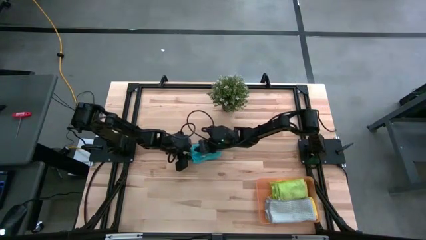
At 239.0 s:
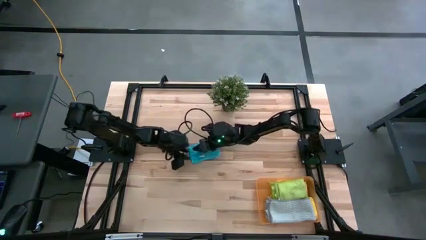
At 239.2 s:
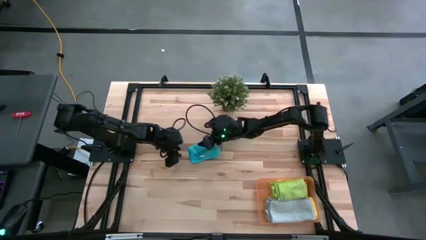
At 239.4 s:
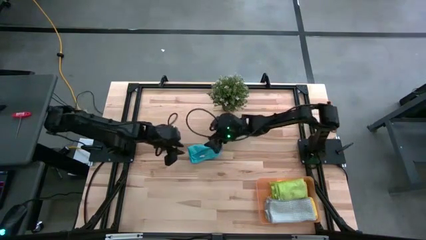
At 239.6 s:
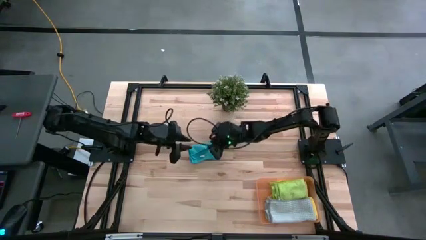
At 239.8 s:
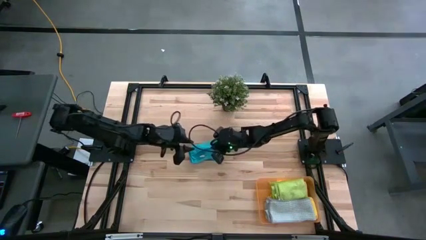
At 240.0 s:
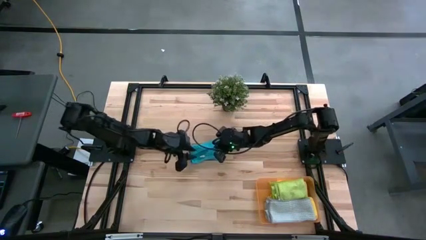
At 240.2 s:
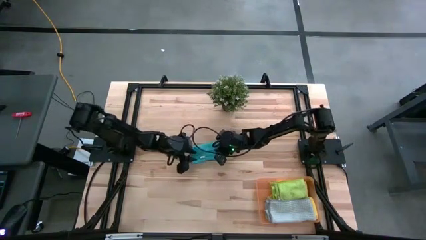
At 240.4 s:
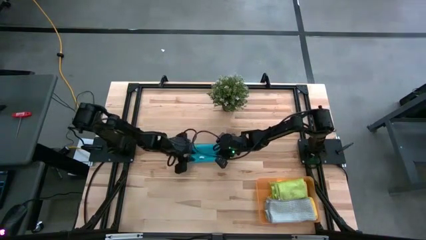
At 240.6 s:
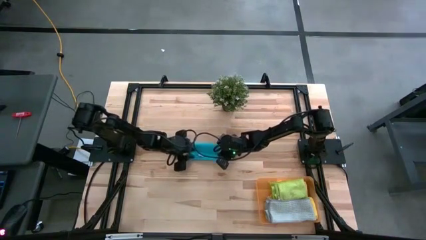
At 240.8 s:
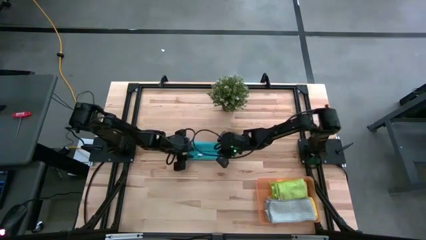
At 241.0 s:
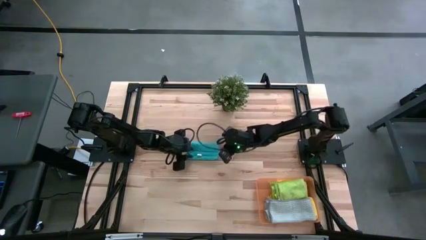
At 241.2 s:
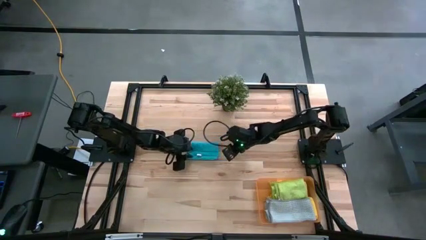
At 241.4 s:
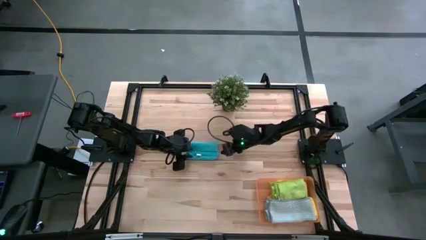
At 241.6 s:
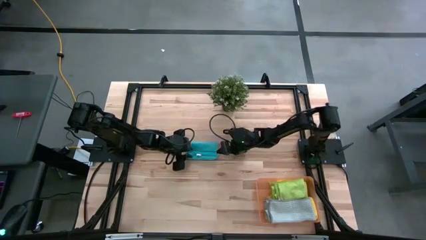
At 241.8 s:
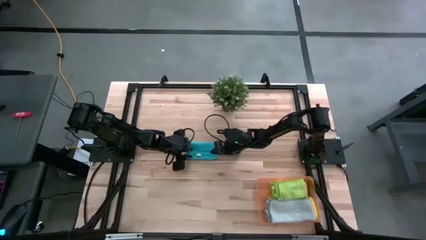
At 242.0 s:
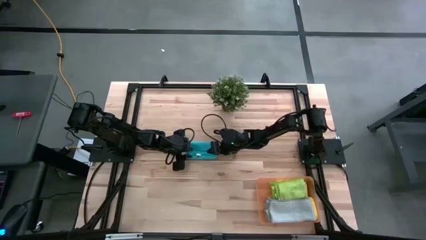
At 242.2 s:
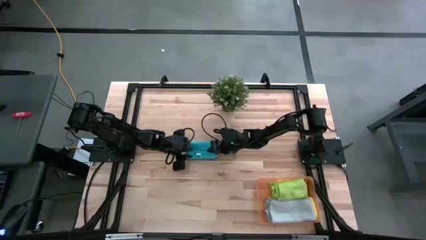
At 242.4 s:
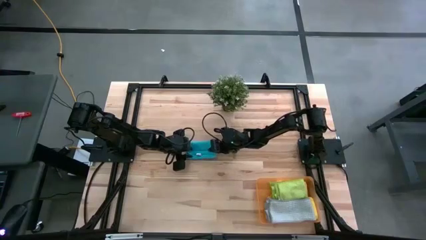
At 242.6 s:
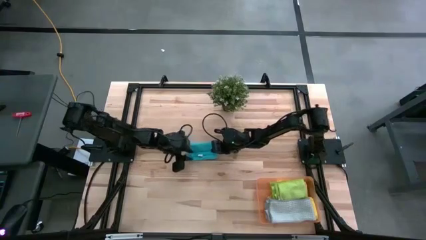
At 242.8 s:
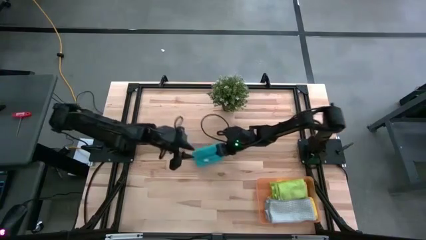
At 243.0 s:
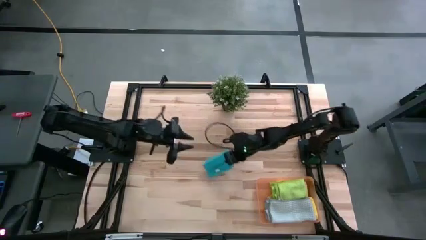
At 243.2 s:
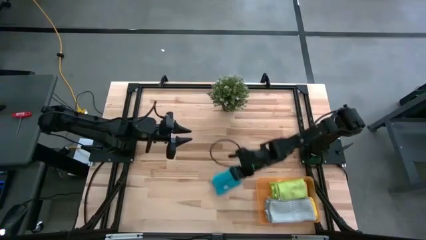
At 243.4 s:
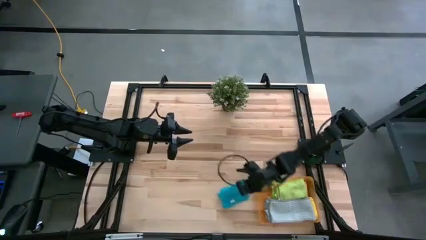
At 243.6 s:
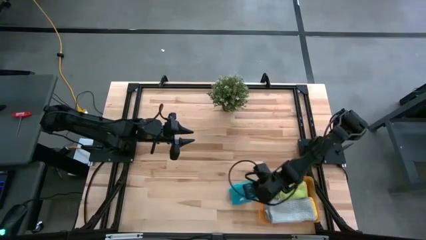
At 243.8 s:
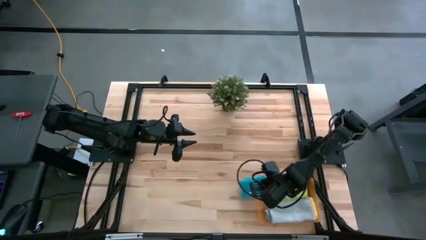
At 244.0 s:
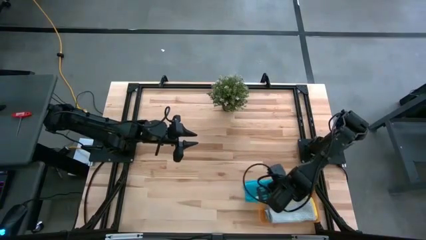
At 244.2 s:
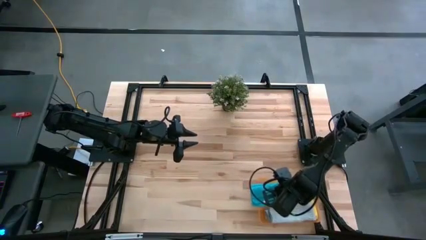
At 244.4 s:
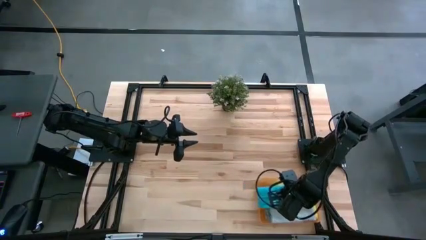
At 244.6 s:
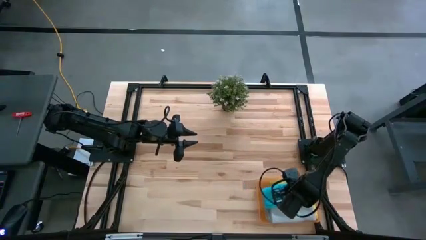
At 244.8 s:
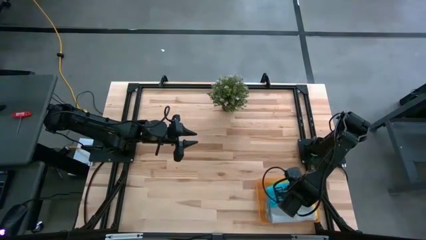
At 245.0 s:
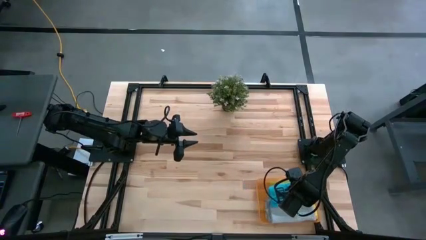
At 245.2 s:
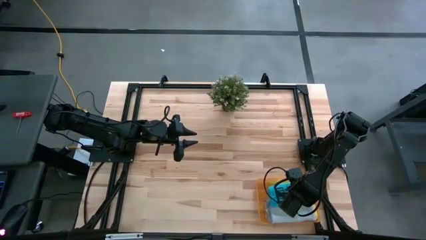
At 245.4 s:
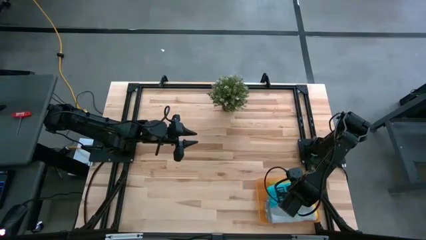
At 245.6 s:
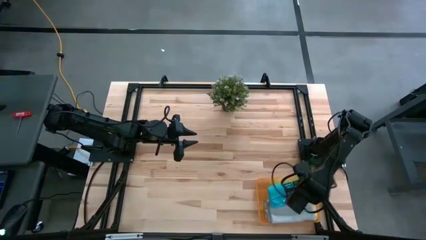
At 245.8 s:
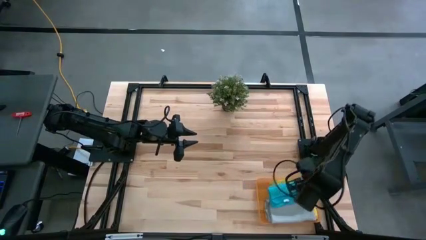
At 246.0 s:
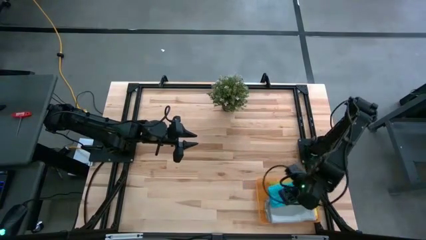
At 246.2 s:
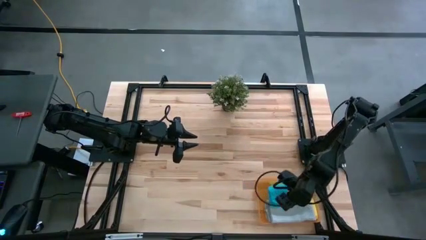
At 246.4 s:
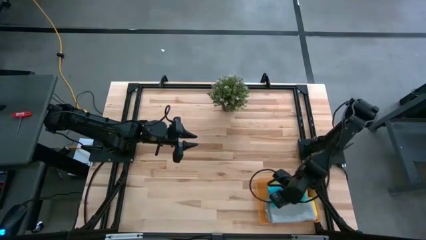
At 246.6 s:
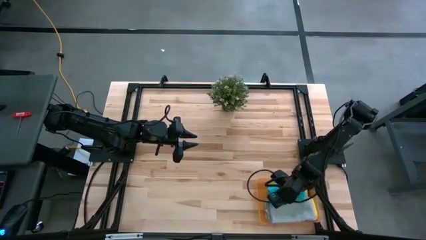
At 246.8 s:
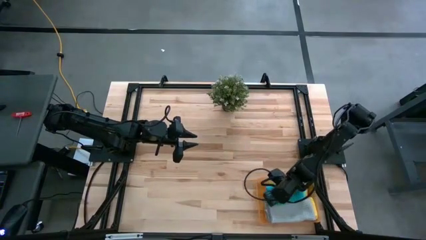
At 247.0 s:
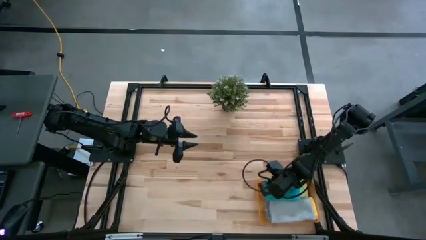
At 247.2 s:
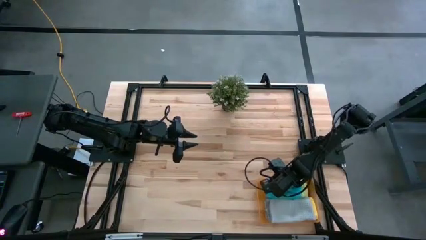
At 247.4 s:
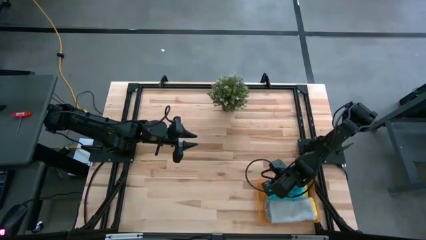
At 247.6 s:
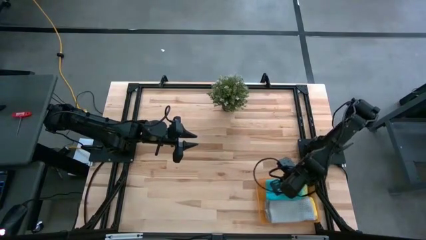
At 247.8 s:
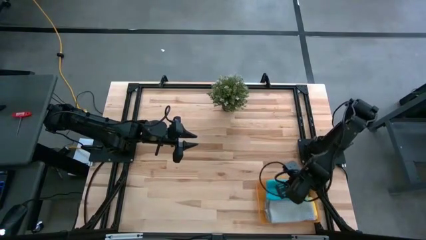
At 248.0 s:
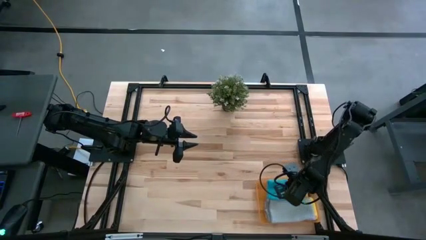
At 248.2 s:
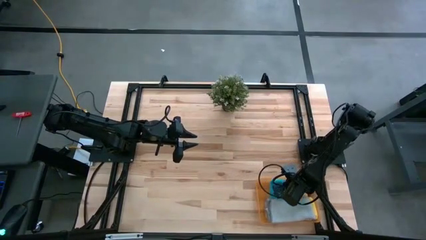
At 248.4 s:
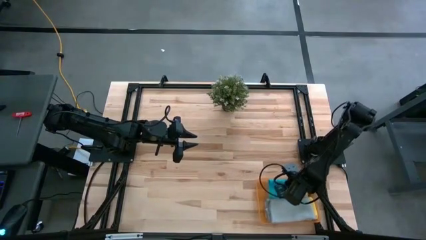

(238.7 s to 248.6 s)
Task: Fold microfiber towels
Put the folded blue microfiber towel into the orange bin

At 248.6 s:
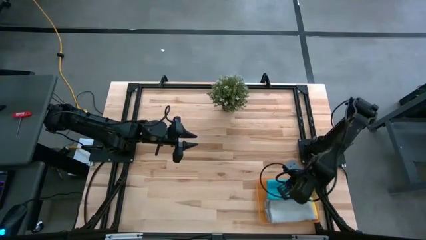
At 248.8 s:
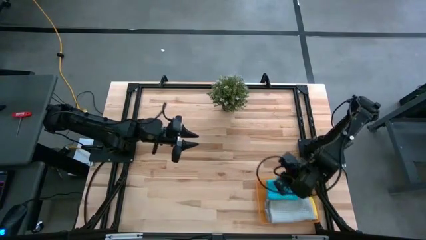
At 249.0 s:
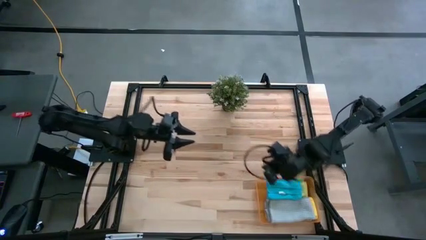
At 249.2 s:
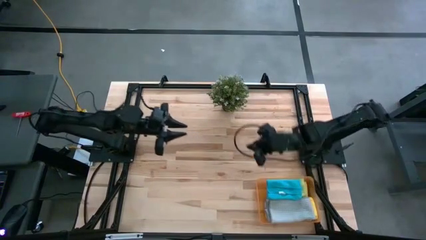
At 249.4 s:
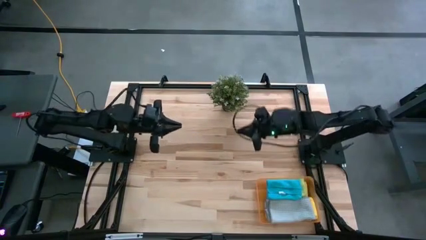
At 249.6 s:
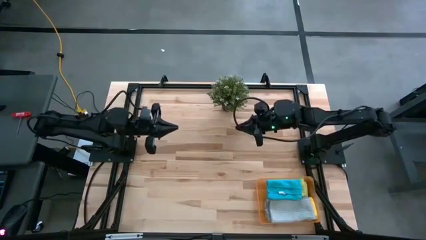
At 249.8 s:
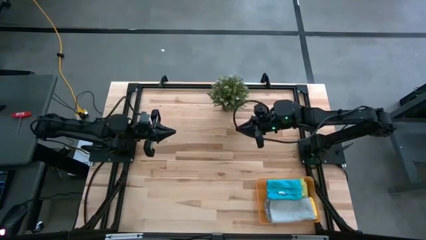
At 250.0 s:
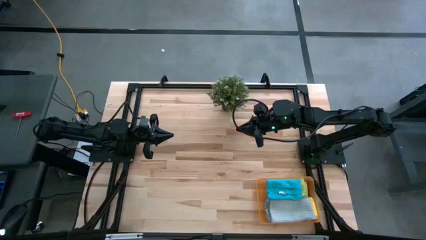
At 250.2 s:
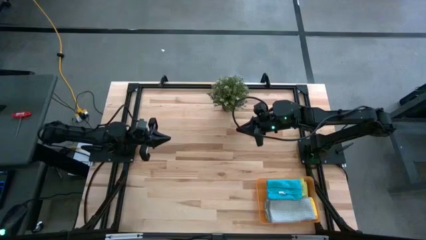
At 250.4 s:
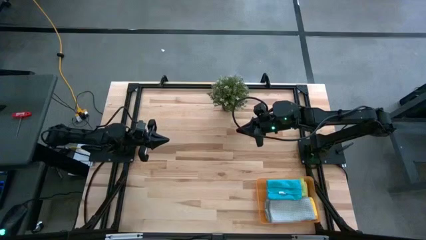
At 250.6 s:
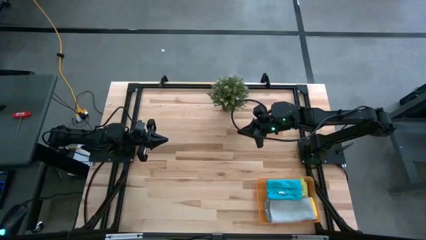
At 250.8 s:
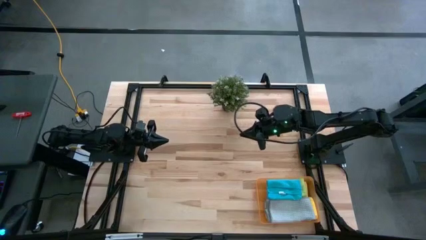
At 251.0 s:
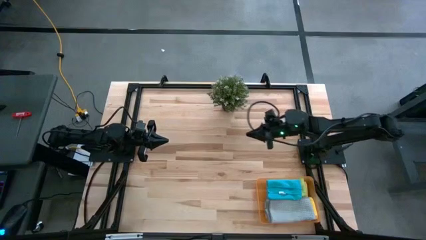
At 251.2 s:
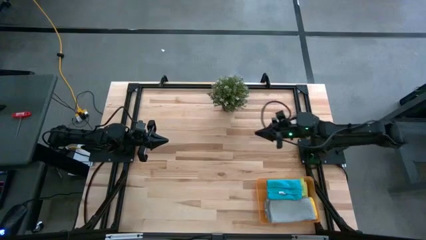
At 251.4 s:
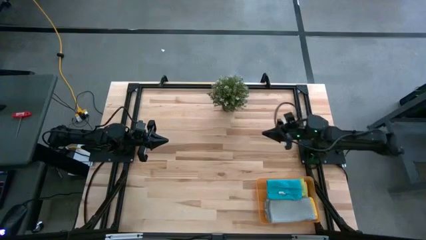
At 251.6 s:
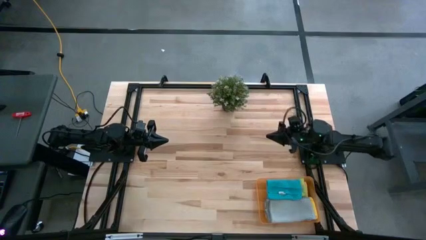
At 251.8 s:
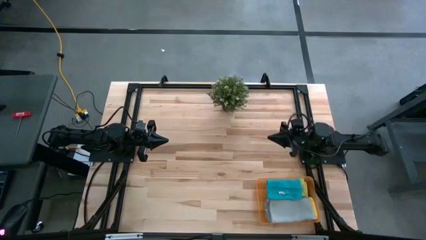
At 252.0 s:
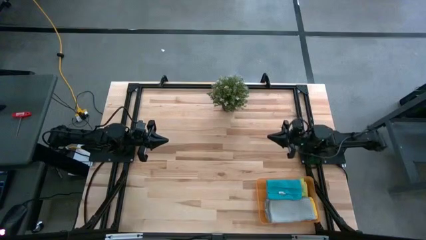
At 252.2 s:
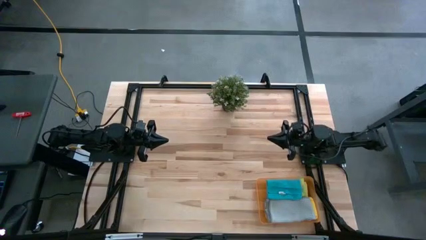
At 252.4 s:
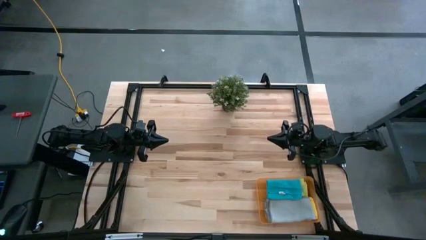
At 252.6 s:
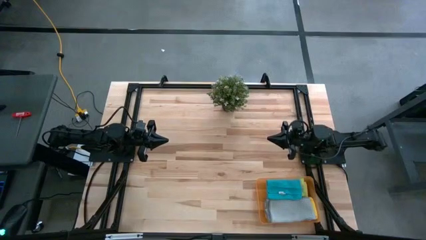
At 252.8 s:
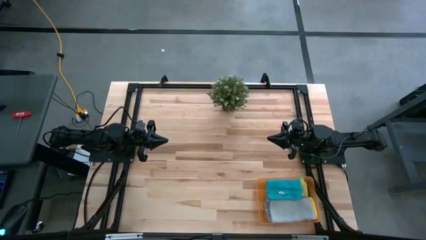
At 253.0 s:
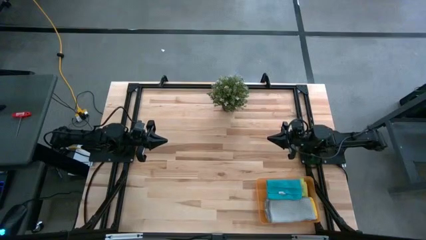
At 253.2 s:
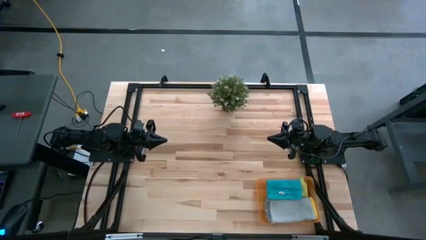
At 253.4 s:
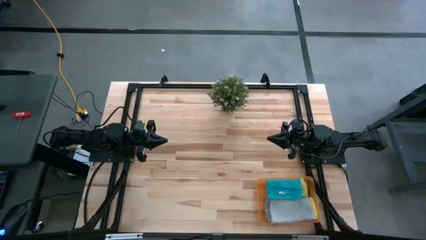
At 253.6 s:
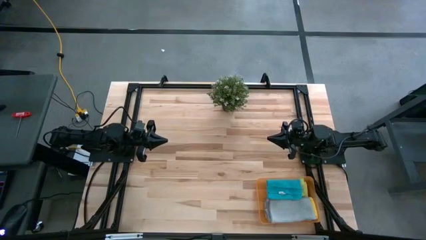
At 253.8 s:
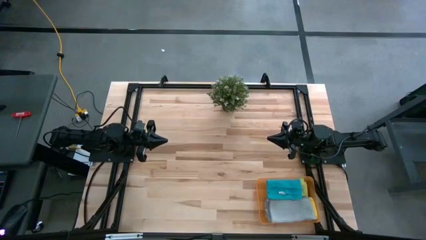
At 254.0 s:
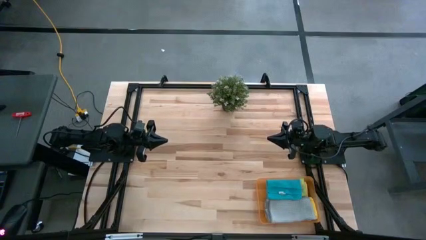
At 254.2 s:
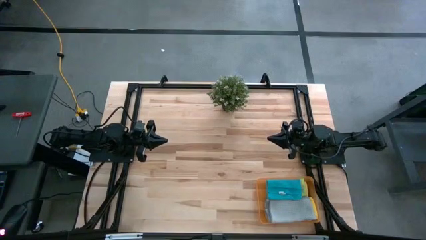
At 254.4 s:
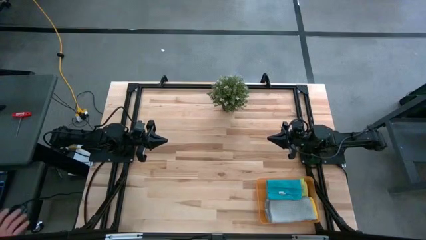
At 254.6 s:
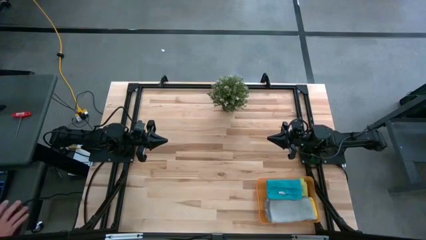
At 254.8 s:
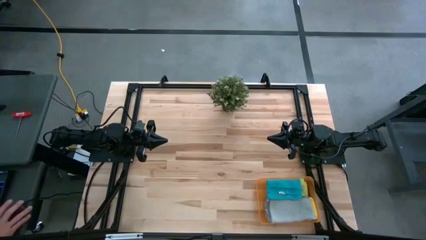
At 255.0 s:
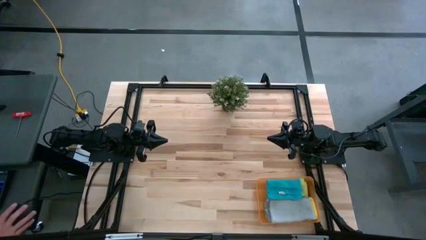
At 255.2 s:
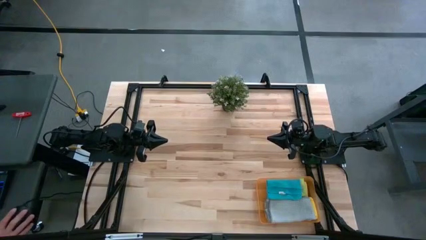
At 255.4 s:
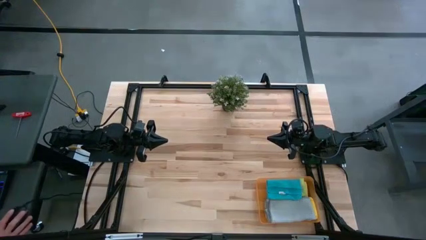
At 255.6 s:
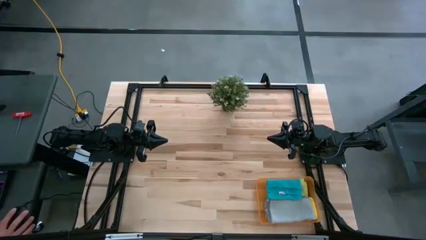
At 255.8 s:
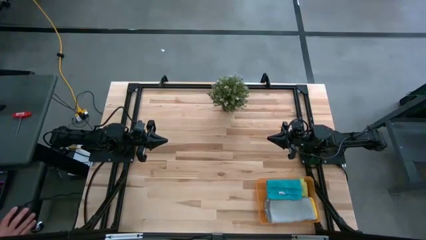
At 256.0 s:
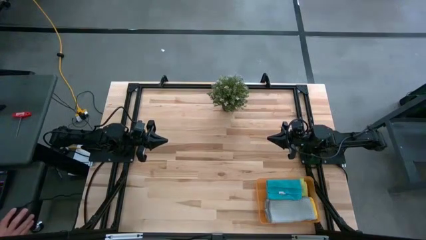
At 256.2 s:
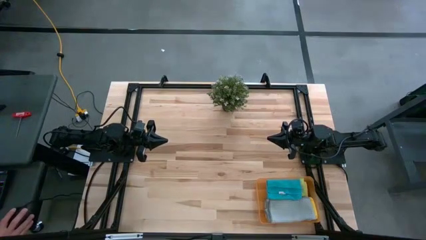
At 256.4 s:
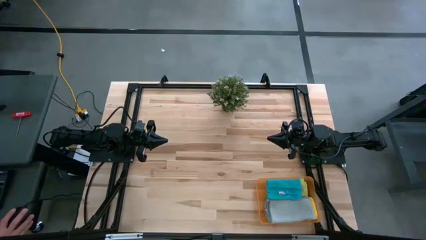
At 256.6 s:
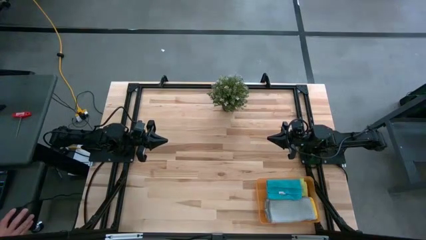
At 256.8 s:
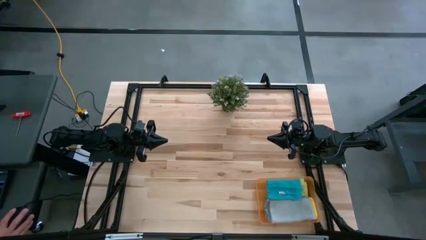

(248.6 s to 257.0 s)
Return to Home Position
